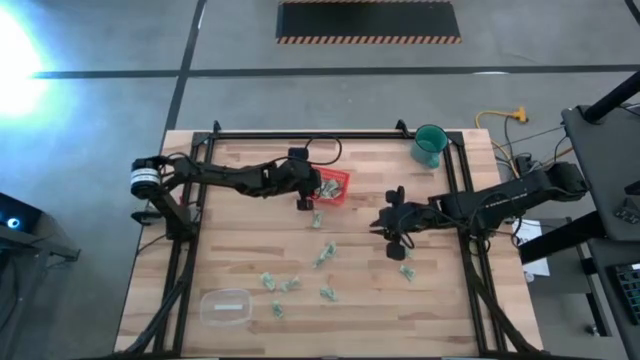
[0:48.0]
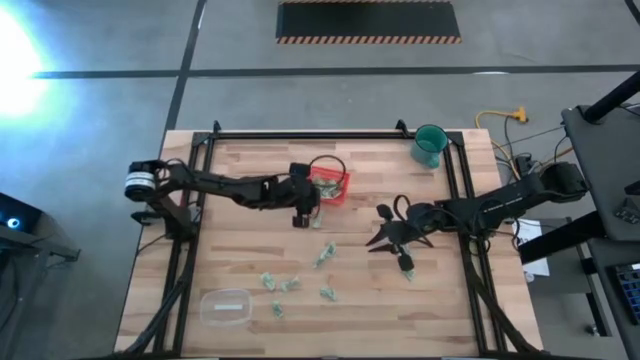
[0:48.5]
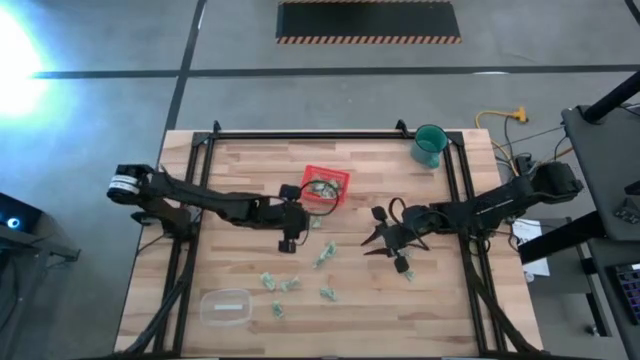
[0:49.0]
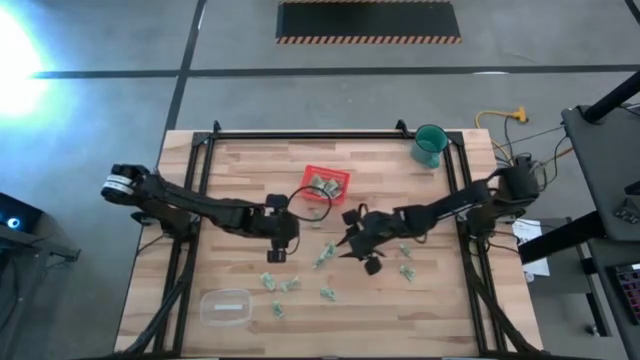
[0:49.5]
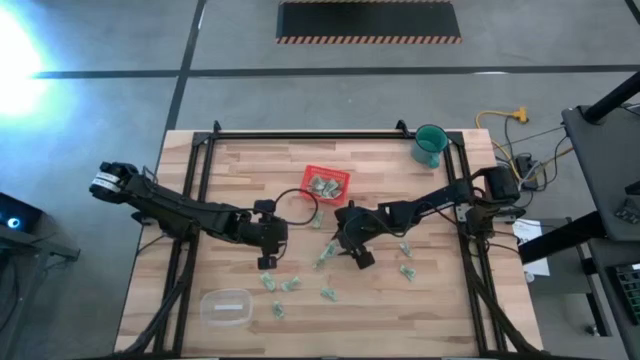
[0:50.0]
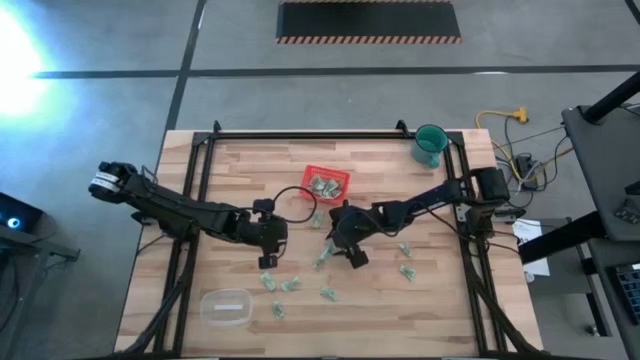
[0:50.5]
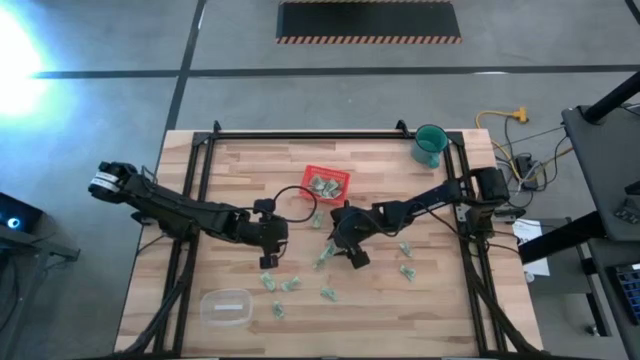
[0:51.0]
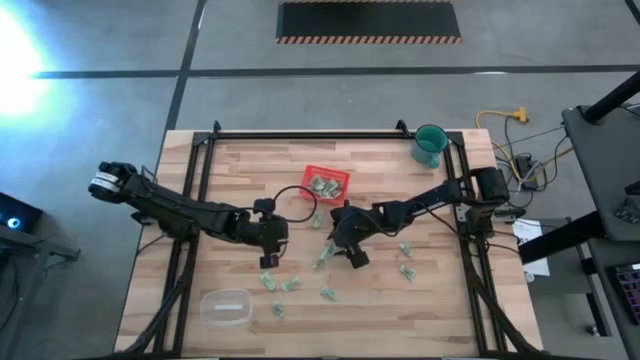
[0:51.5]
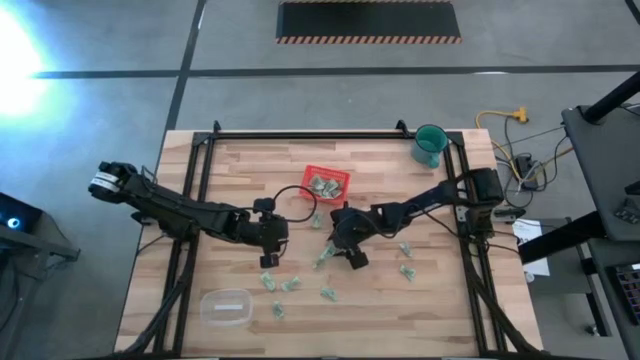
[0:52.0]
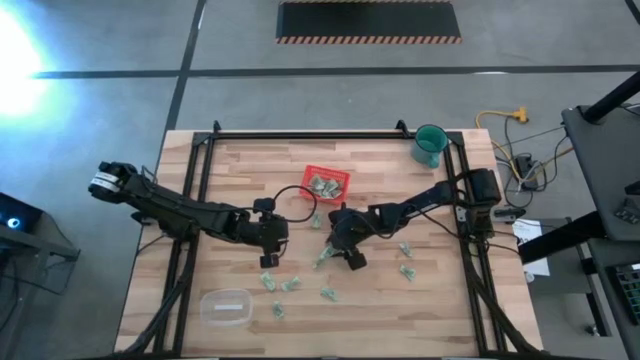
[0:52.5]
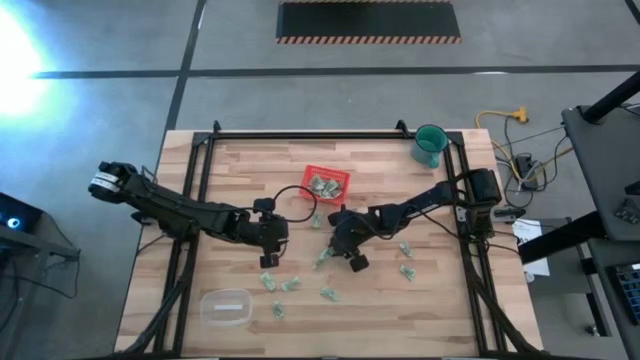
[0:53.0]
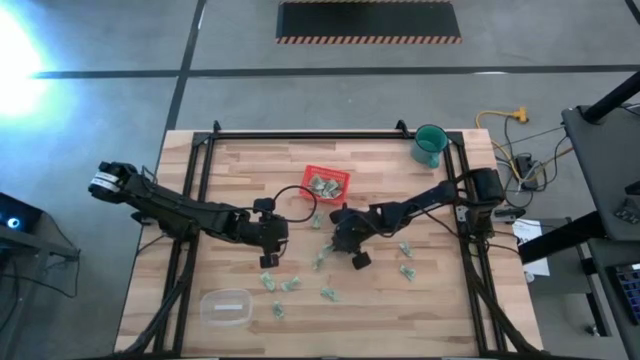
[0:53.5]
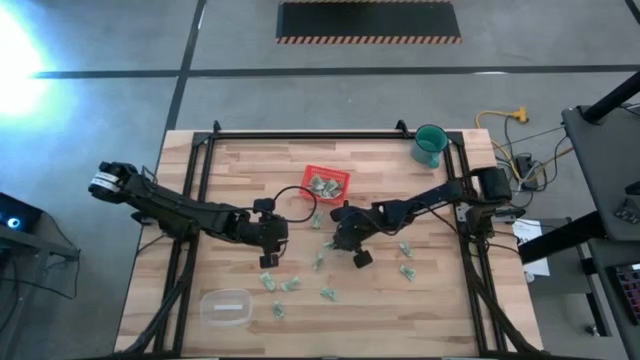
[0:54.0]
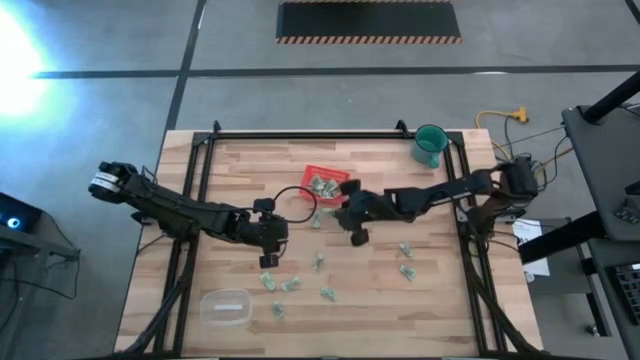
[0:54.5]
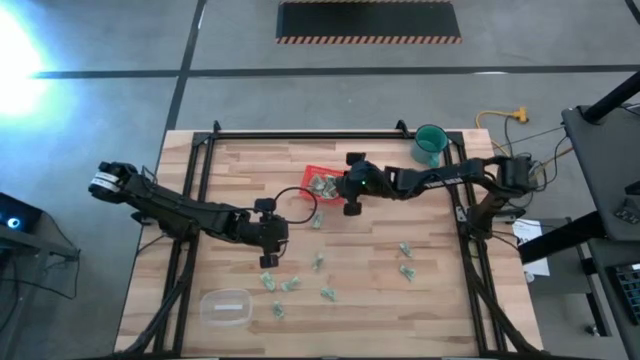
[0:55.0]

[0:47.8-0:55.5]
Task: Pick and place items into bin
Put the stevia packet into the orange bin

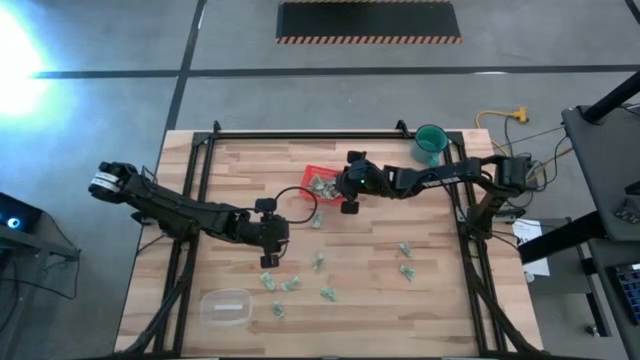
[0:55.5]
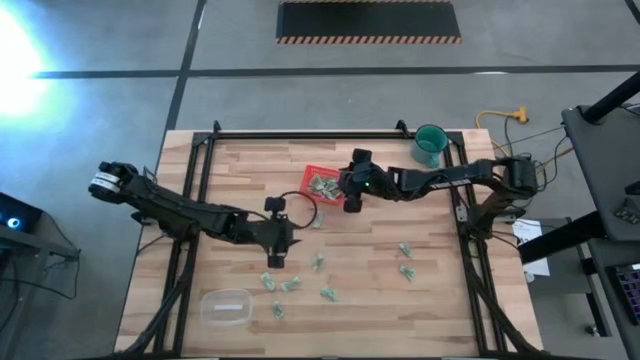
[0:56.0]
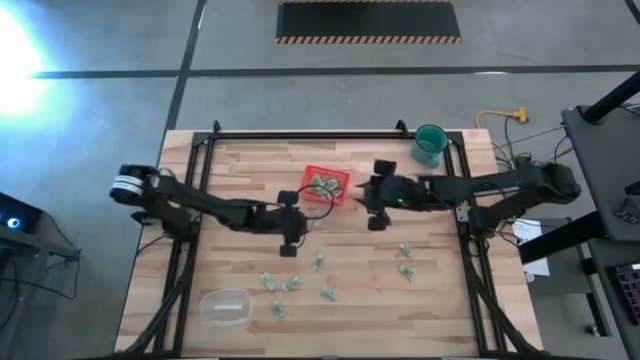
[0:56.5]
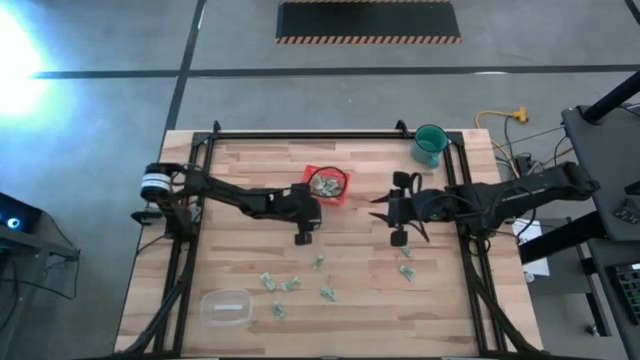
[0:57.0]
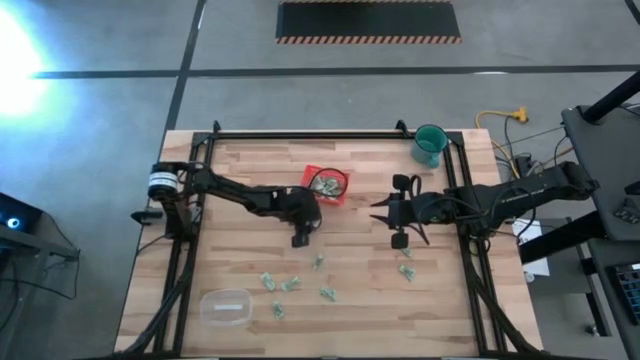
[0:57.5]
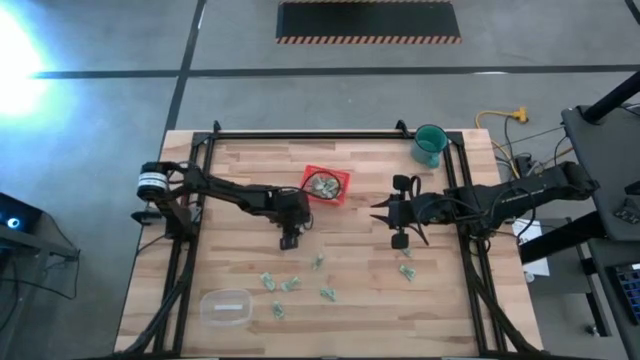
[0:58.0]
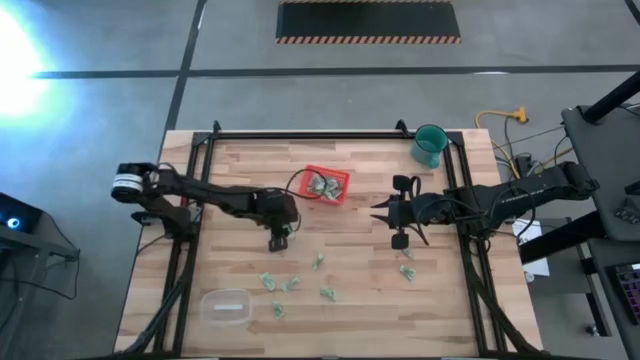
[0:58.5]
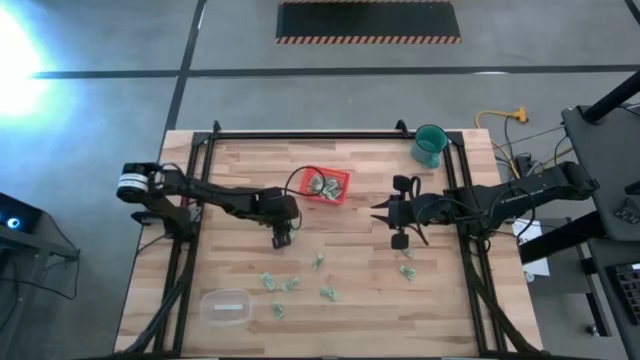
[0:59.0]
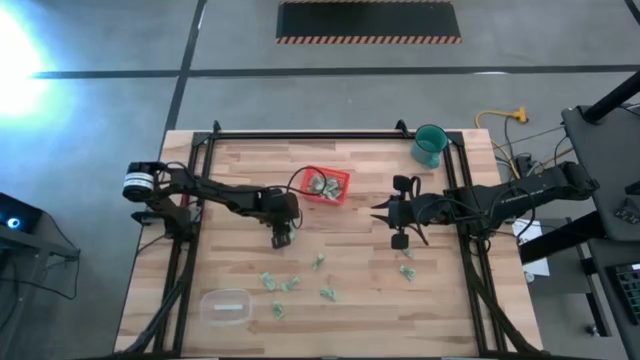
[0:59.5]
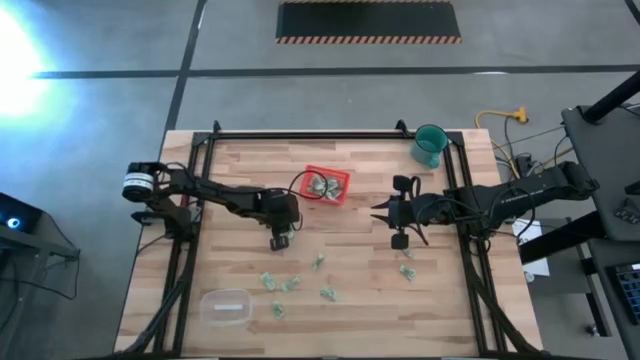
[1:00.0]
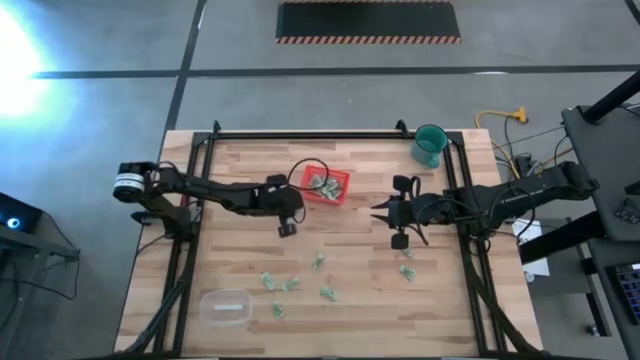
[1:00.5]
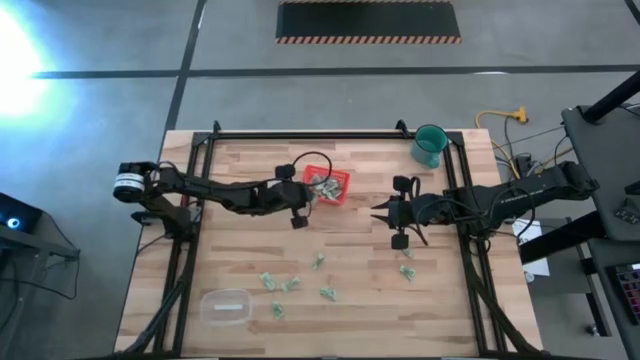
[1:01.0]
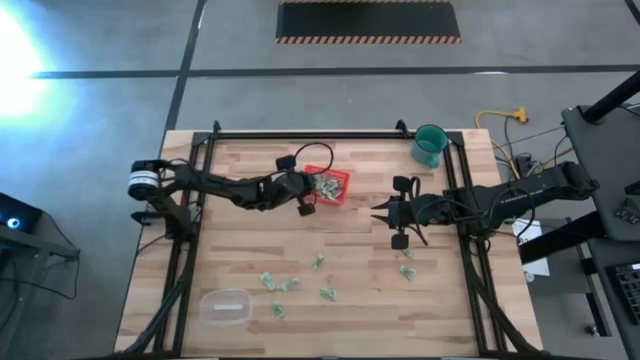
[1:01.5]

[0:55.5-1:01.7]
Put the stevia packet into the orange bin

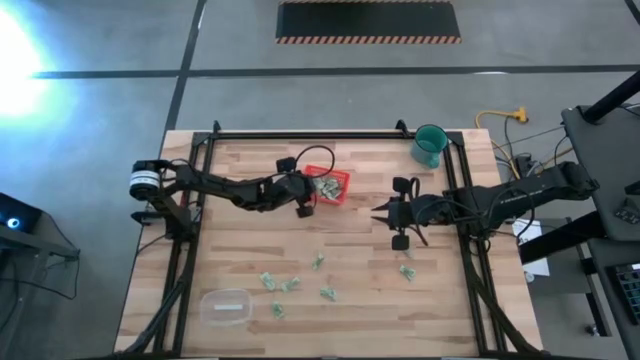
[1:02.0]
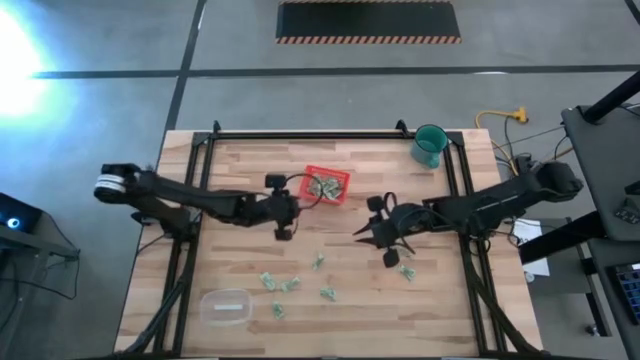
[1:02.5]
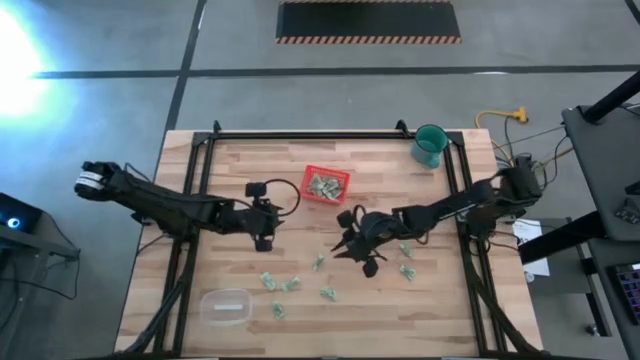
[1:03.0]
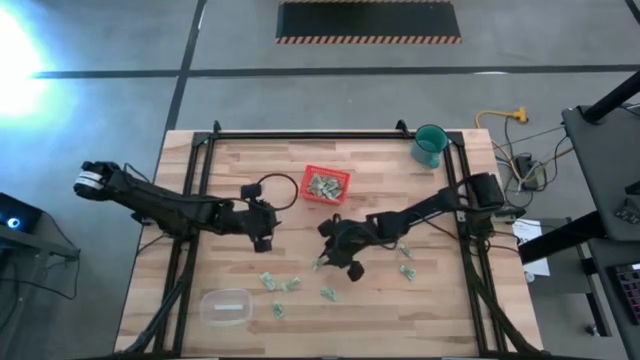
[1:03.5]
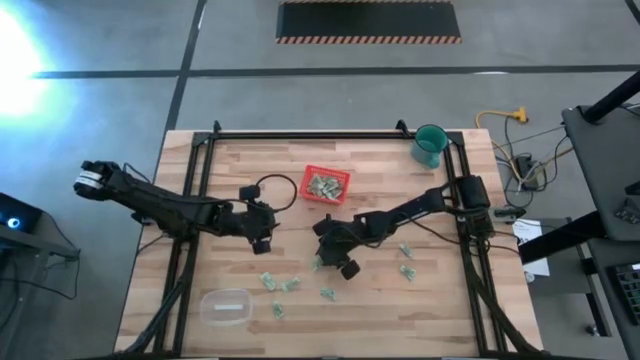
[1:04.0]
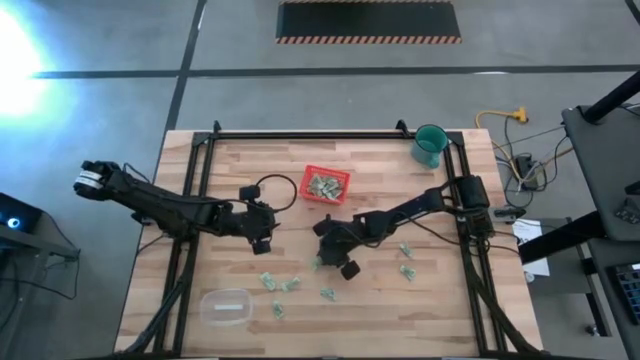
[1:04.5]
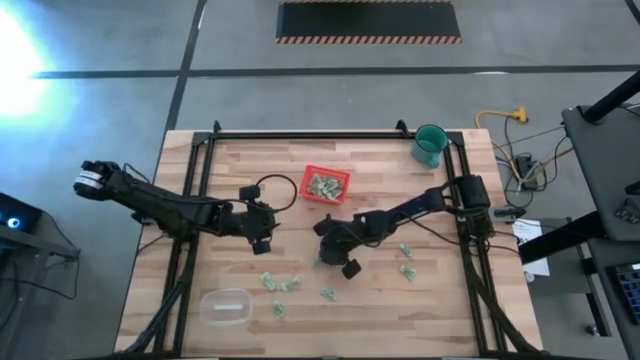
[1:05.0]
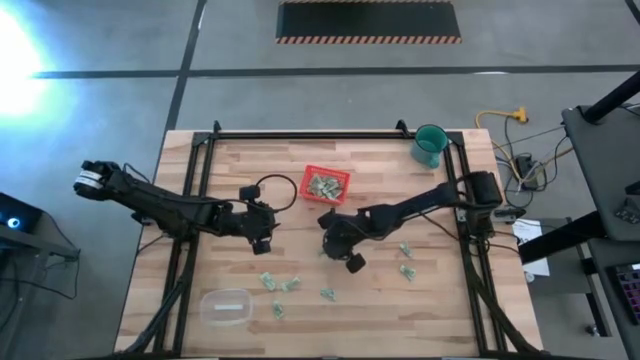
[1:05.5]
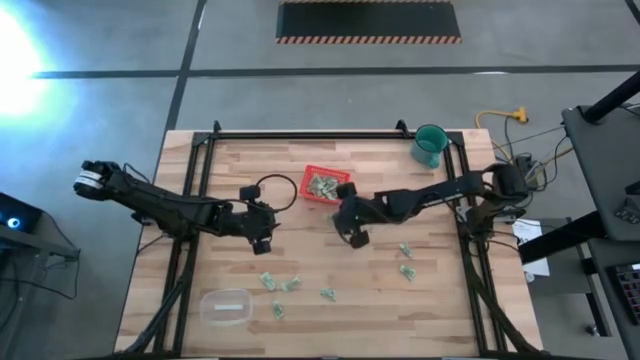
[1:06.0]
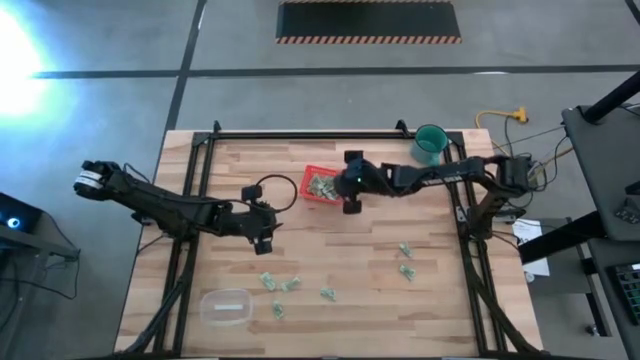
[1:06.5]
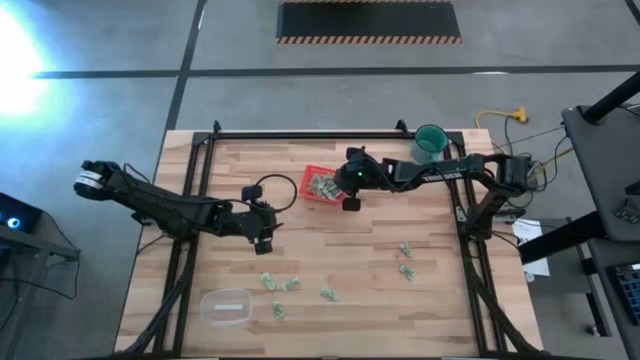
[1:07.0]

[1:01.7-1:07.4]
Put the stevia packet into the orange bin

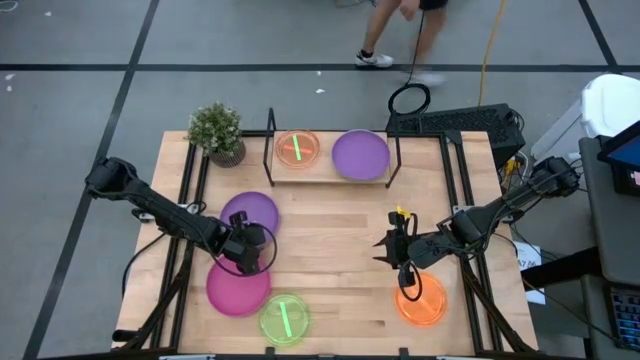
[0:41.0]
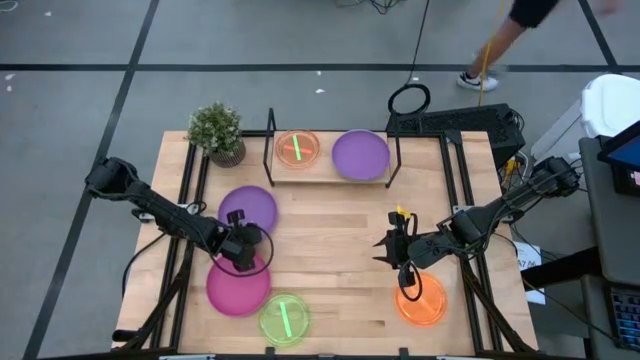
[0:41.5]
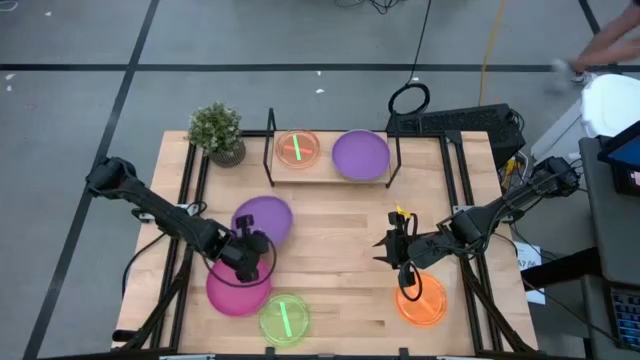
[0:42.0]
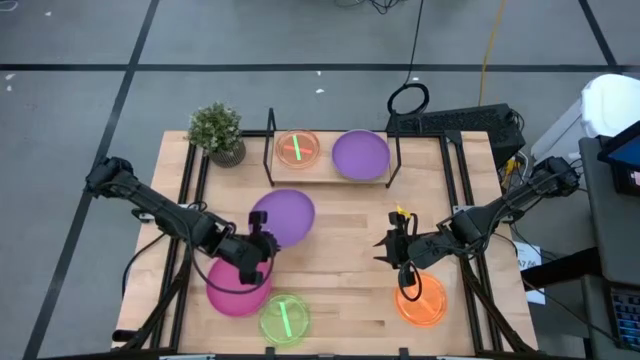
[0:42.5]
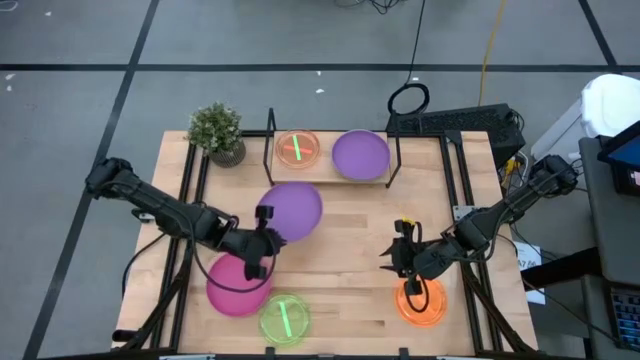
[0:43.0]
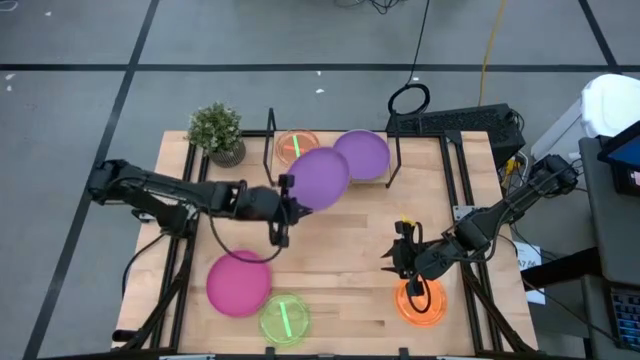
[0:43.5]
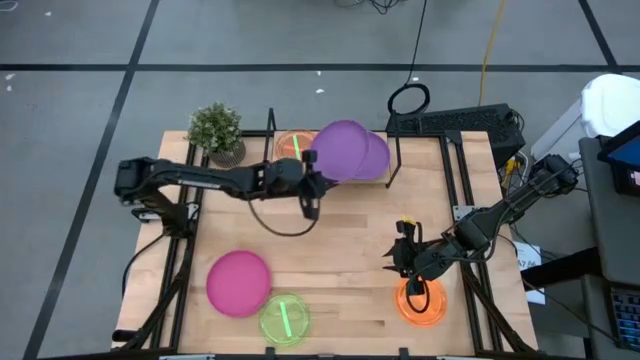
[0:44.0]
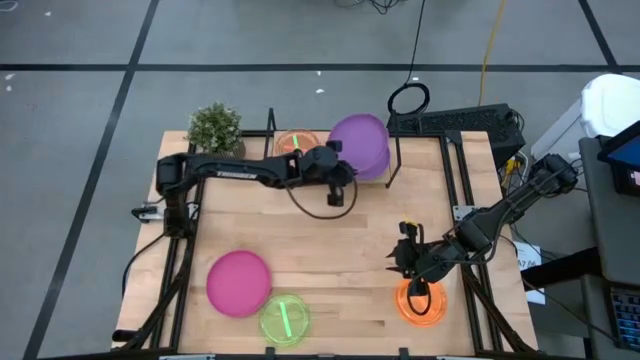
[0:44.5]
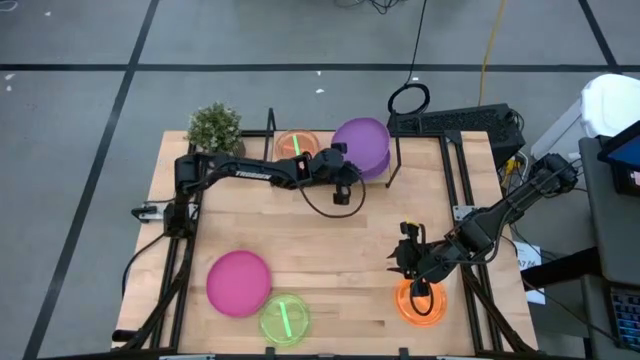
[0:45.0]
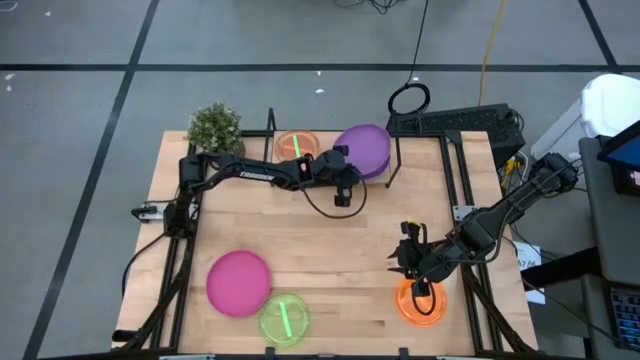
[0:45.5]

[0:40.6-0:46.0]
Task: Place and stack plates onto a shelf
Stack the purple plate on top of the purple plate
